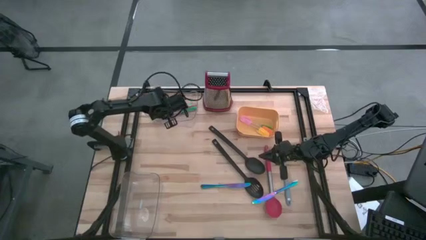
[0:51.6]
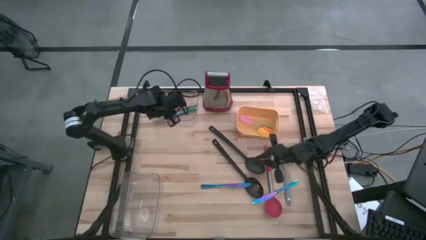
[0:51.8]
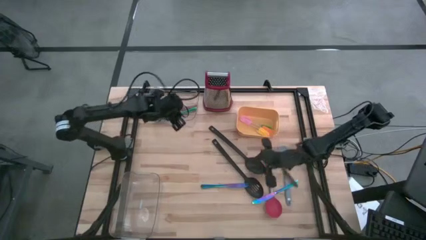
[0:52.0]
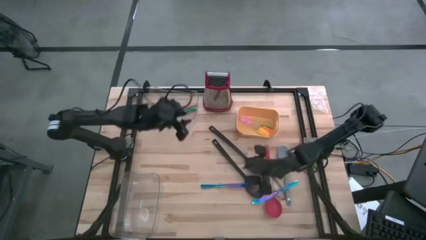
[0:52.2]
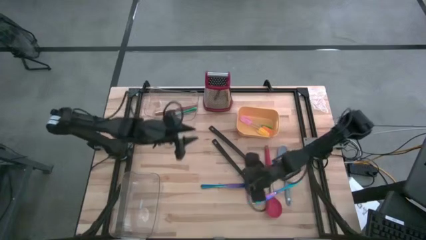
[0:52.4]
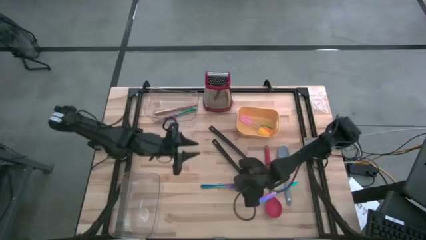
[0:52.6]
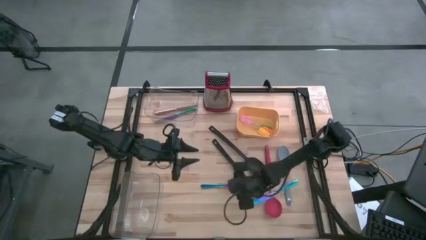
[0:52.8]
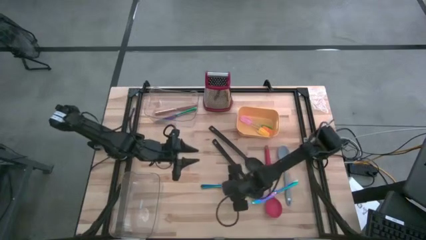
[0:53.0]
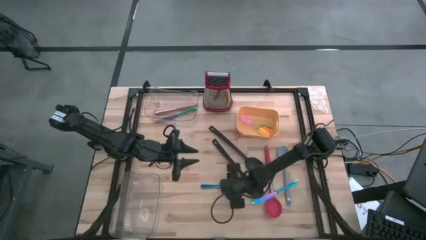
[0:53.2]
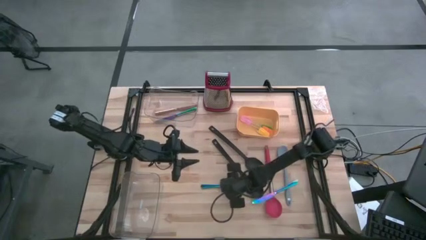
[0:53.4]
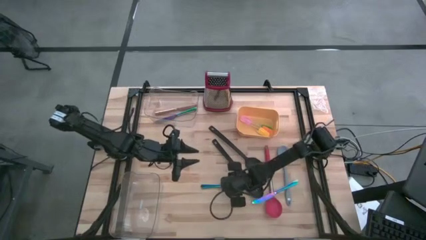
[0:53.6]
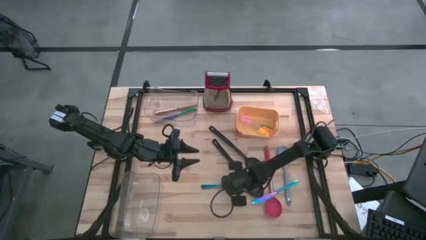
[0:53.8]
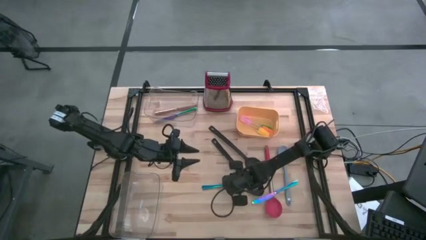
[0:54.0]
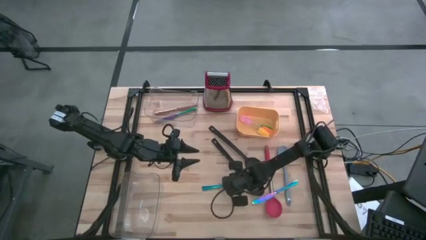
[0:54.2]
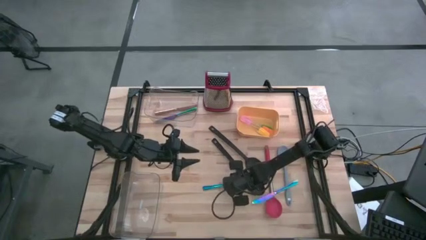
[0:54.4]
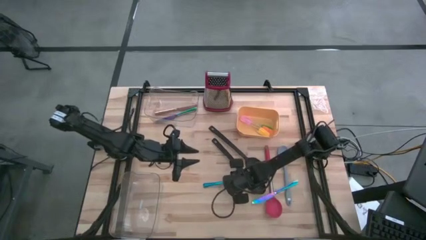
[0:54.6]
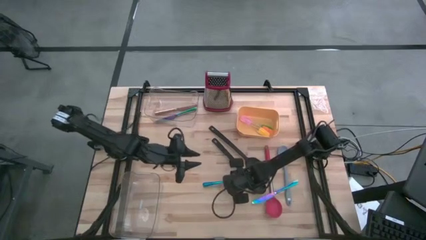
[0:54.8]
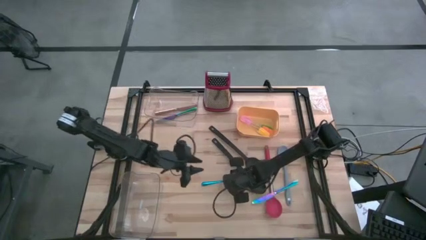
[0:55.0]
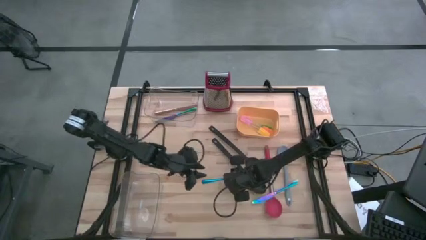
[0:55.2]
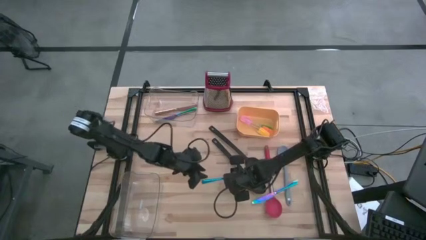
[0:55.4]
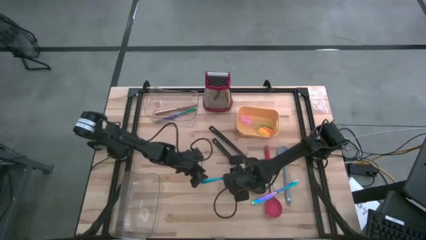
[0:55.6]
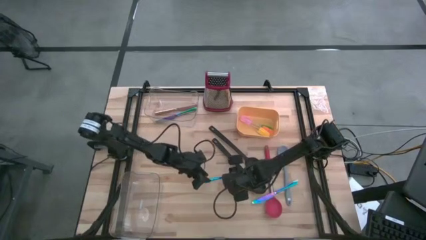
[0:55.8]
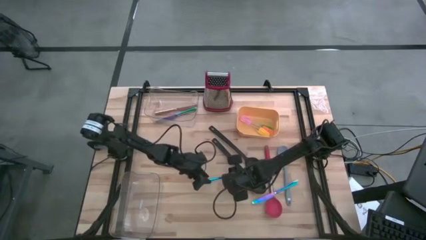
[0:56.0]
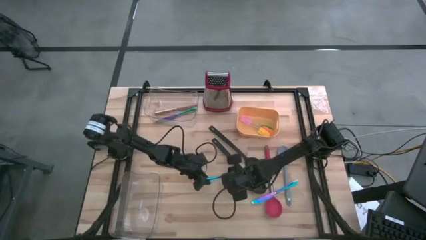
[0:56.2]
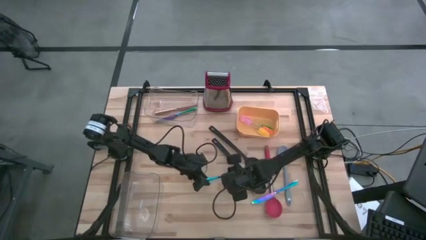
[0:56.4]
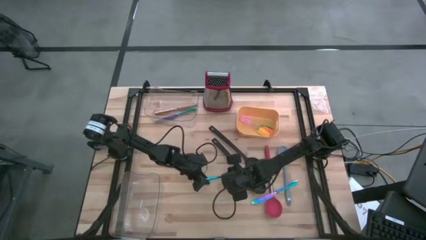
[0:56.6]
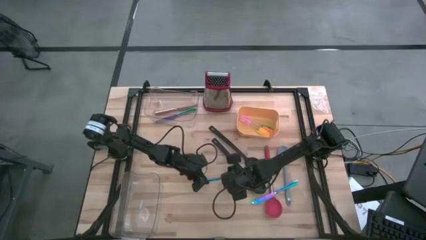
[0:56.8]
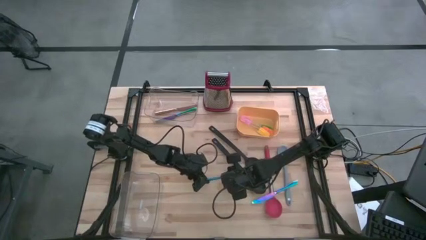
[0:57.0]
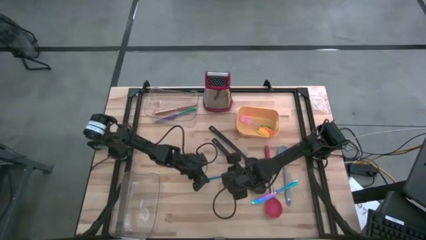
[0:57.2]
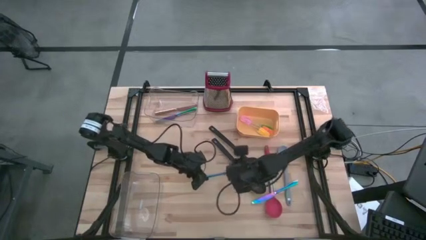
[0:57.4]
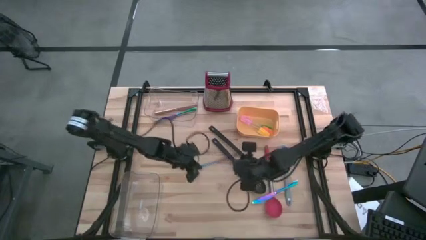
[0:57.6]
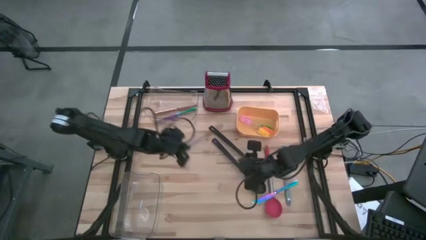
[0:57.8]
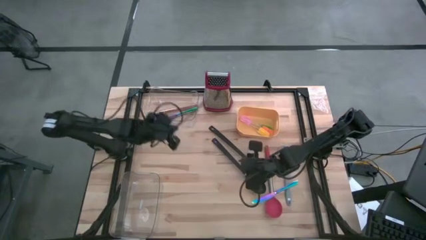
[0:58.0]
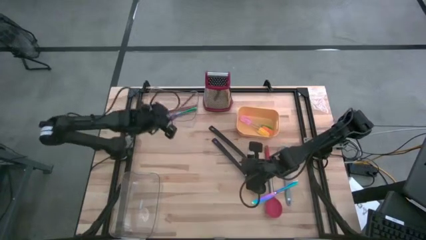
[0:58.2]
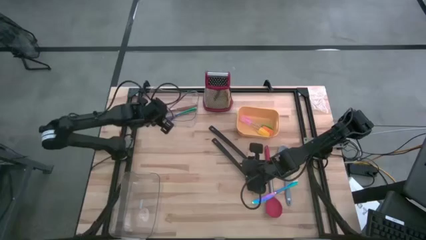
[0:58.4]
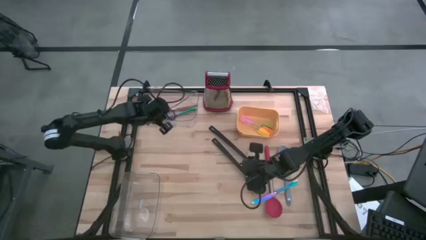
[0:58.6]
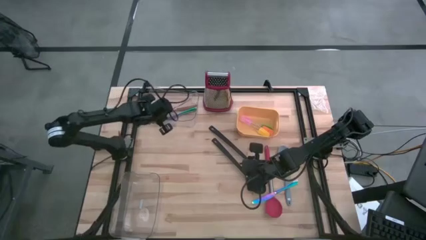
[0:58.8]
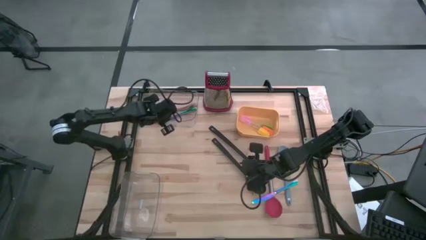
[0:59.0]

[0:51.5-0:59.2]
Task: Pick & Place Kitchen Items
Put the blue knife into the top transparent bin

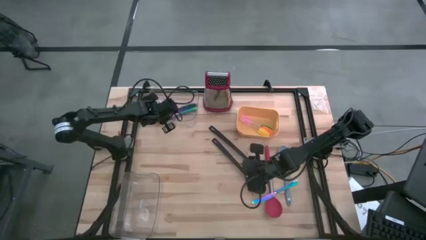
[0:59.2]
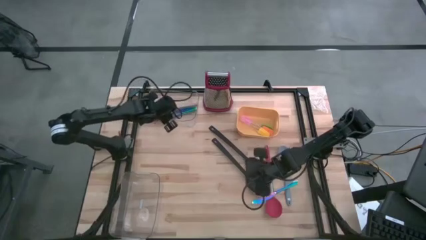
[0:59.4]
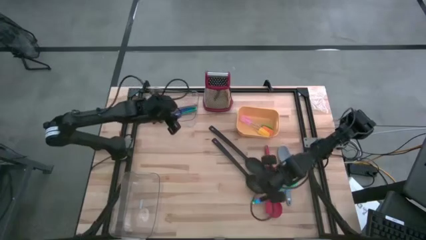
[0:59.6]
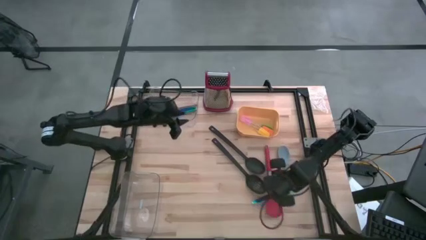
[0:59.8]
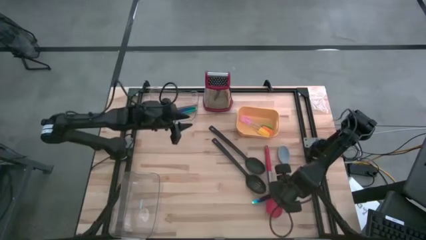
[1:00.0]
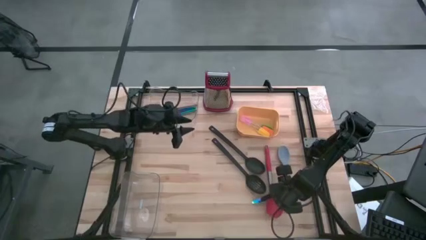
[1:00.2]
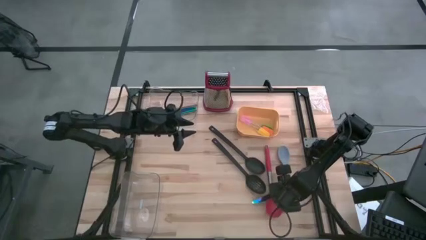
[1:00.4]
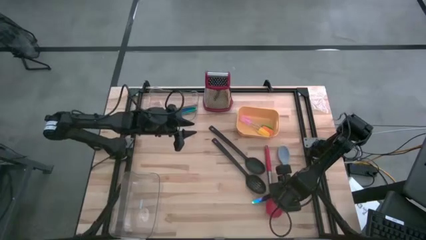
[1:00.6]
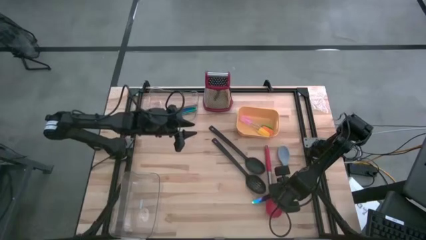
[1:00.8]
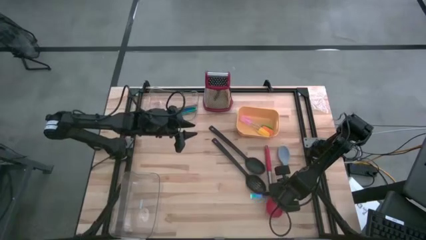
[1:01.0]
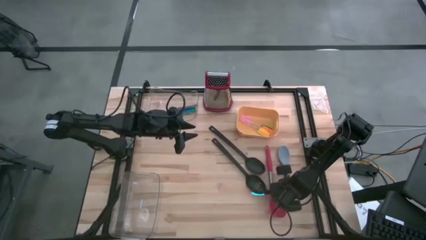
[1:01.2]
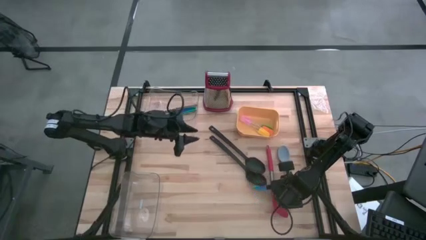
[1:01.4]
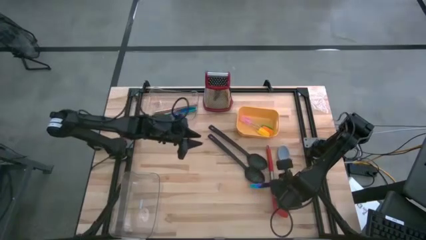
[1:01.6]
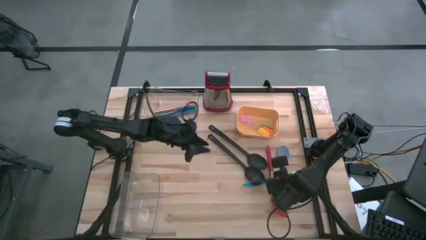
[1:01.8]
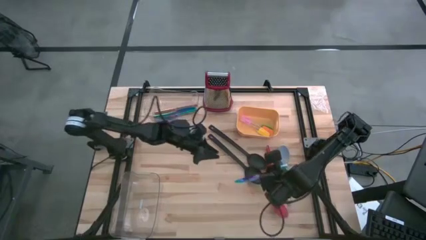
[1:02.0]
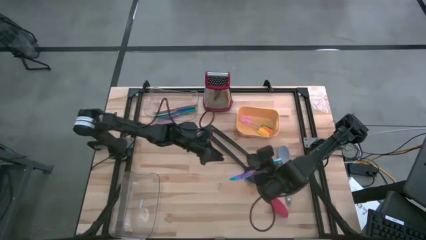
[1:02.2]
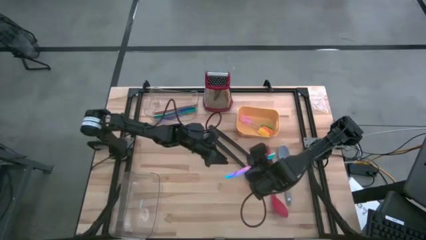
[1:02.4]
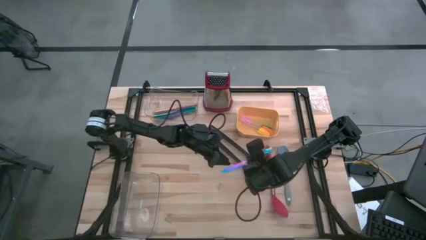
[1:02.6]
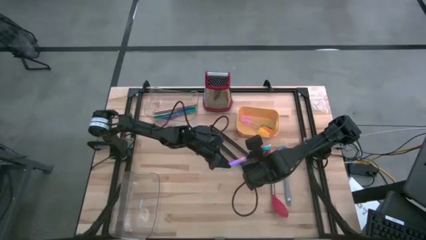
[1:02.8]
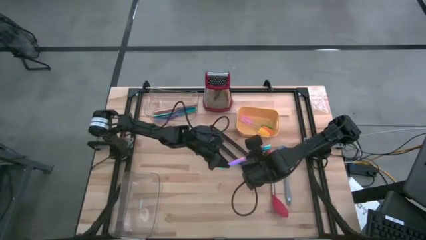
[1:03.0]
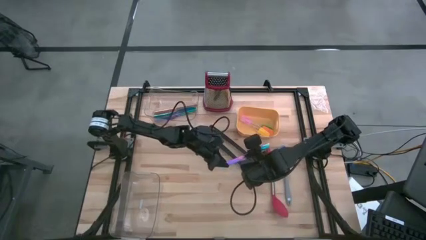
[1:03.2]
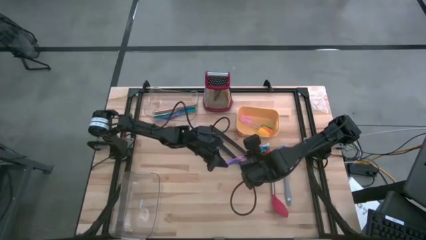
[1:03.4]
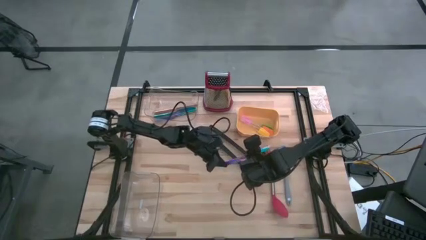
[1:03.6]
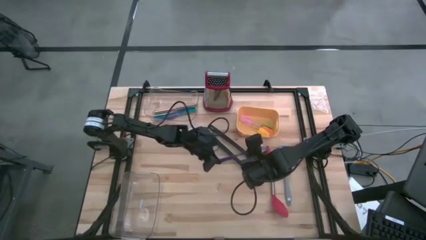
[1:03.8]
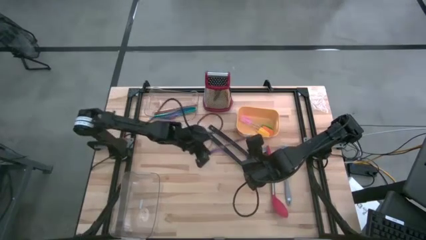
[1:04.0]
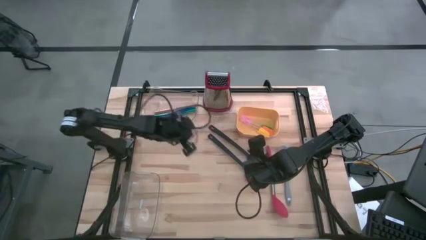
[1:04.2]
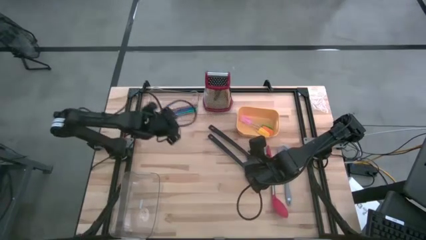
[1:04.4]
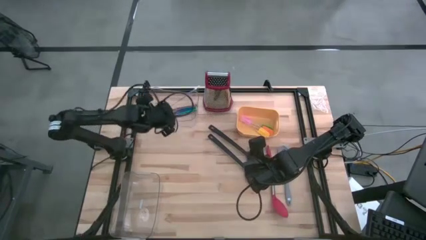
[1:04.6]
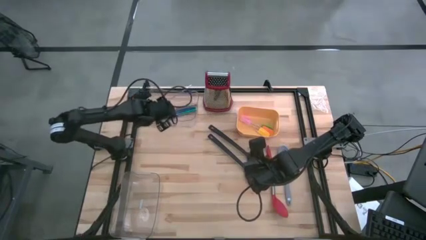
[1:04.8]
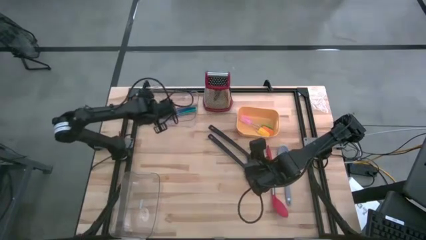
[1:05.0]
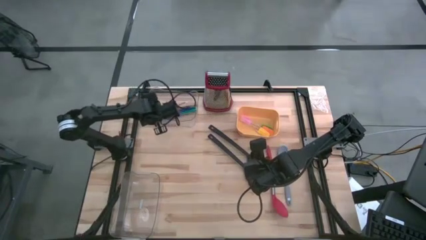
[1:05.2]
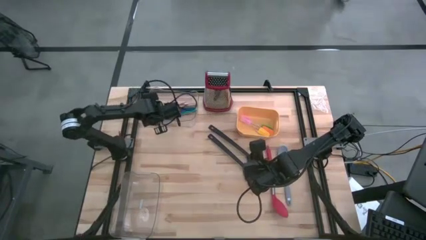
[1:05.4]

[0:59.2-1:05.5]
Put the blue knife into the top transparent bin

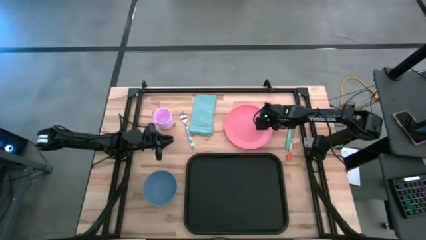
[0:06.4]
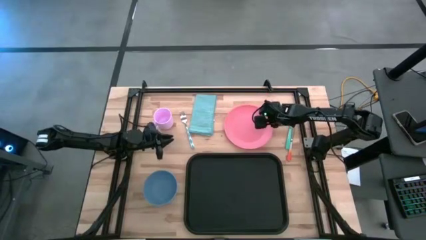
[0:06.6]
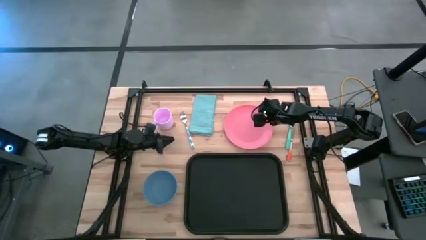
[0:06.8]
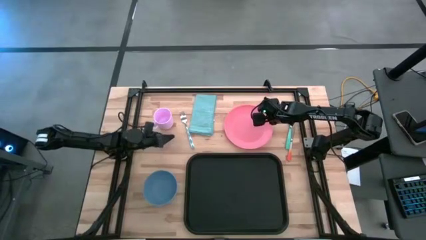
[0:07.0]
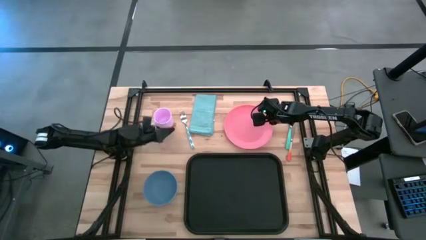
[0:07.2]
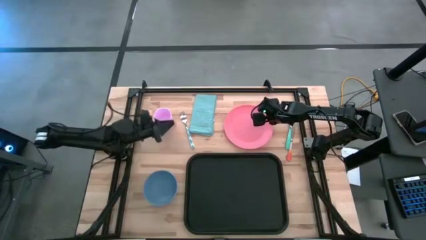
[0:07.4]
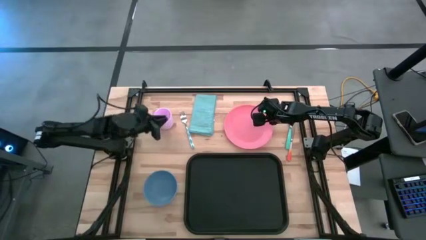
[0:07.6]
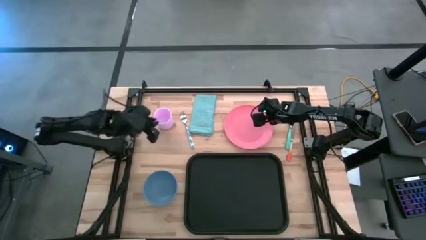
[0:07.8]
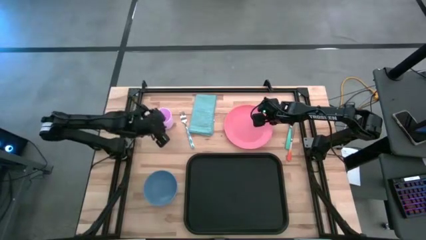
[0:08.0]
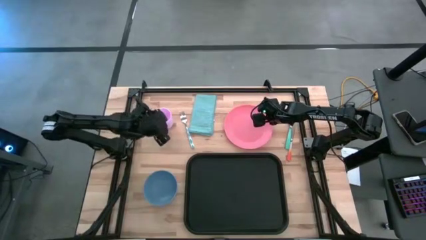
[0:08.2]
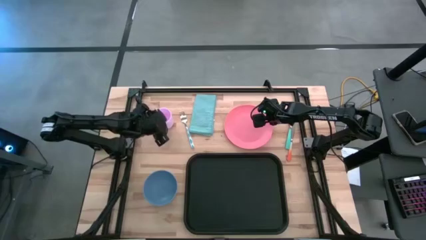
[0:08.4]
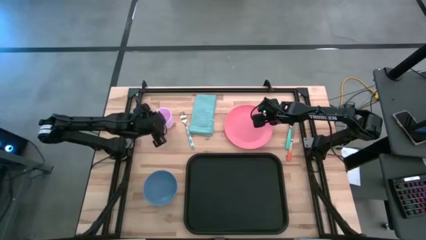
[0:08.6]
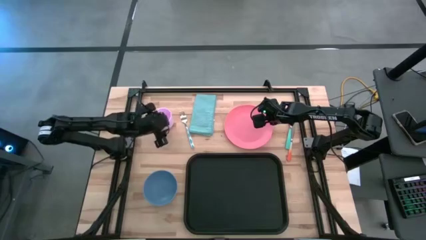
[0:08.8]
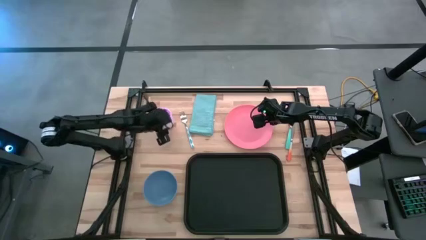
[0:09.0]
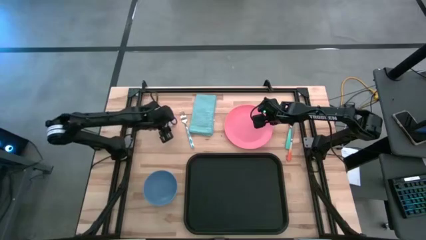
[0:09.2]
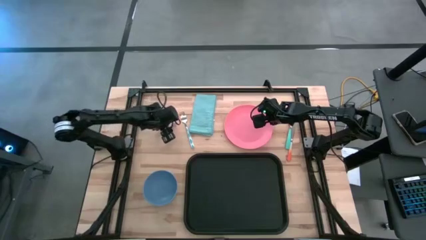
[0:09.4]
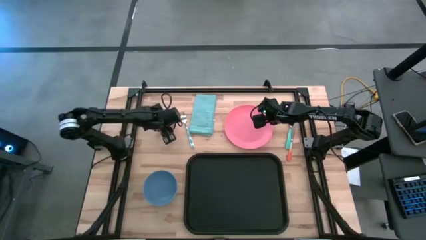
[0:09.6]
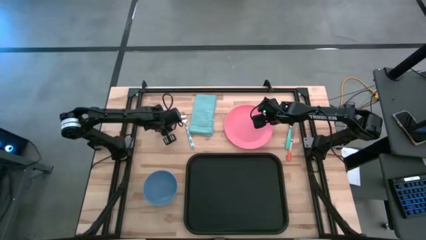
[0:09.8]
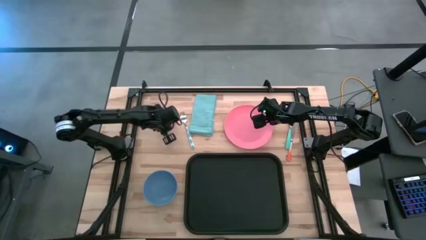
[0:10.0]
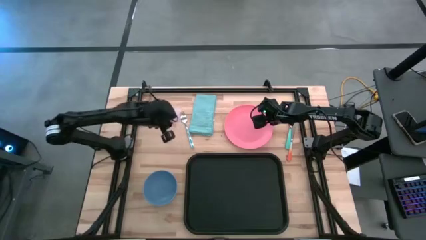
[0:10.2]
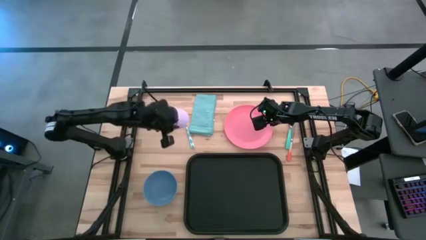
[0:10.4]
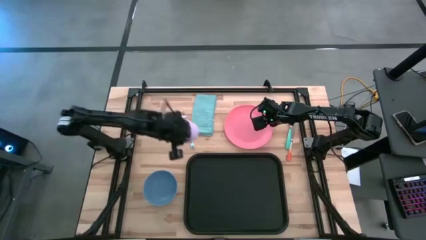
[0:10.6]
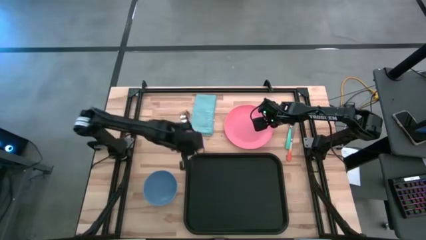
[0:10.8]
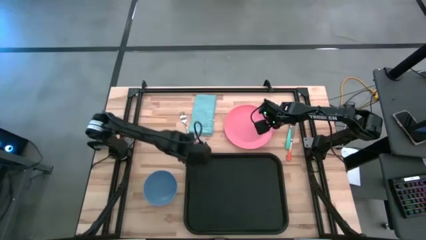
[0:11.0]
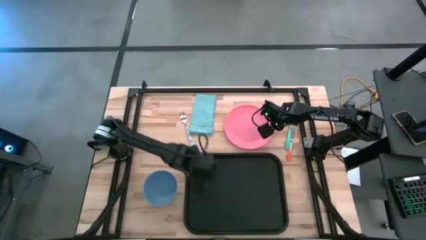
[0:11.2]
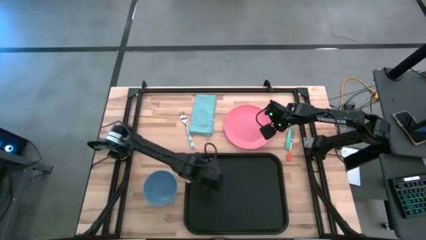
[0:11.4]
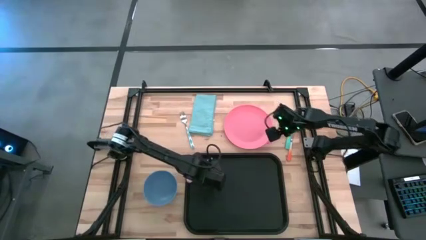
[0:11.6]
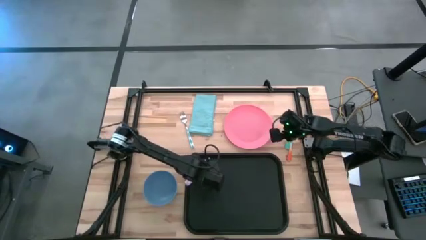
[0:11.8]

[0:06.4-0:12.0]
Task: Set up tray
Put the pink cup on the top left of the black serving tray
